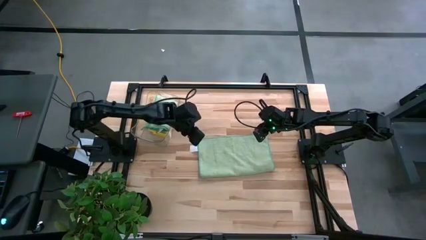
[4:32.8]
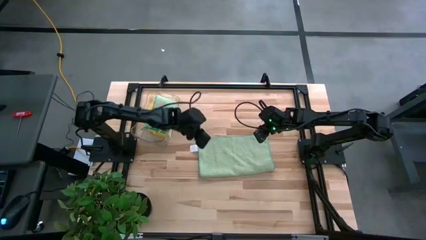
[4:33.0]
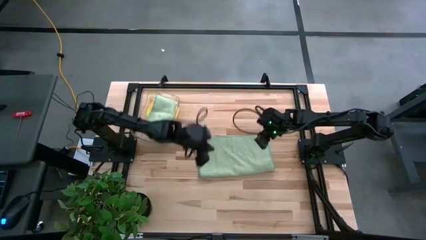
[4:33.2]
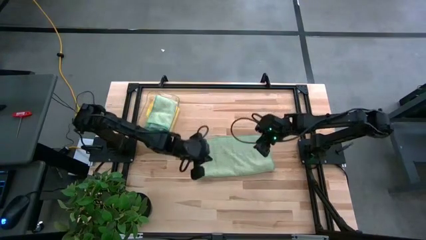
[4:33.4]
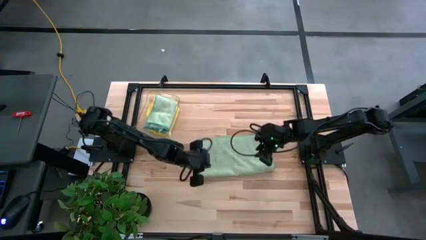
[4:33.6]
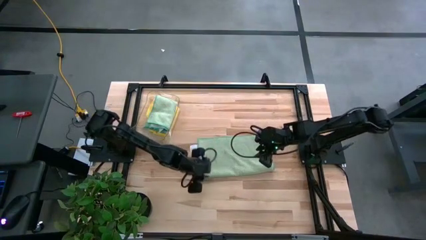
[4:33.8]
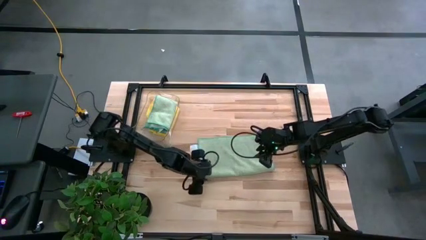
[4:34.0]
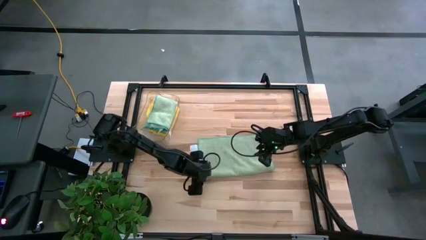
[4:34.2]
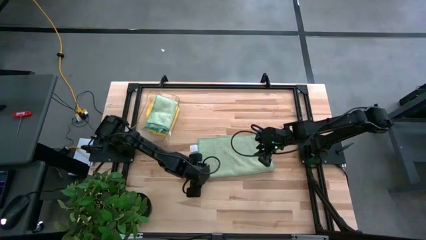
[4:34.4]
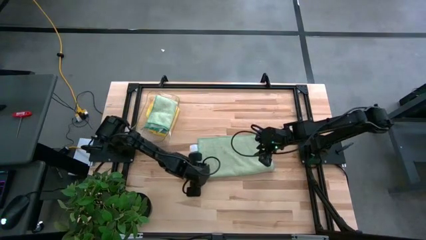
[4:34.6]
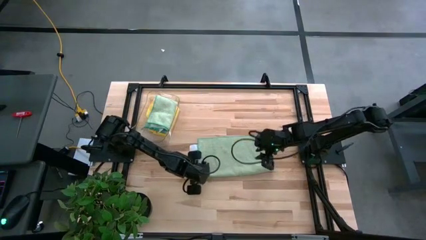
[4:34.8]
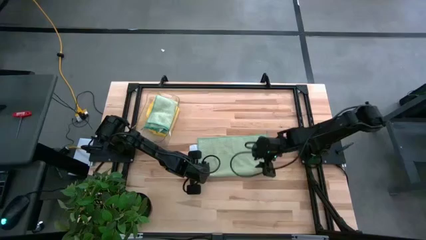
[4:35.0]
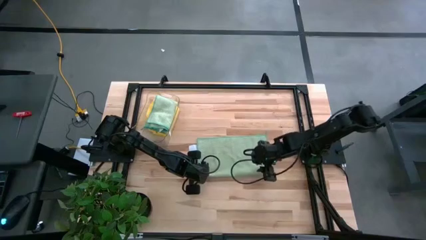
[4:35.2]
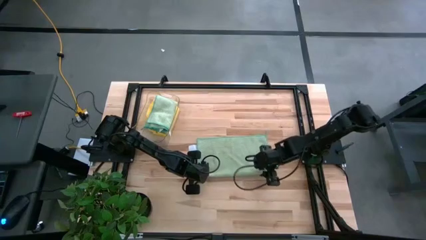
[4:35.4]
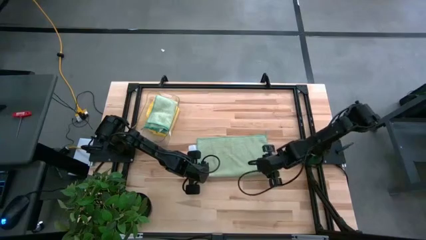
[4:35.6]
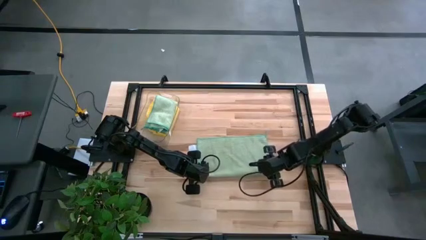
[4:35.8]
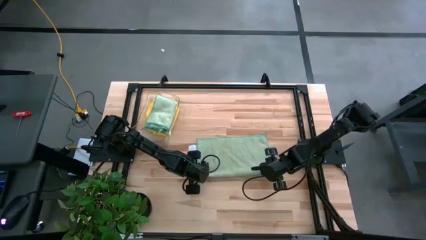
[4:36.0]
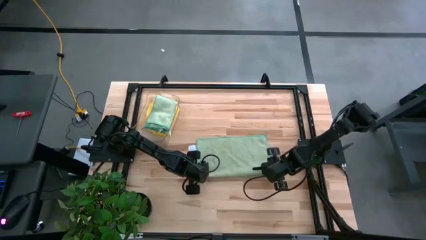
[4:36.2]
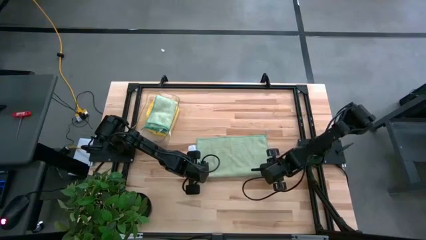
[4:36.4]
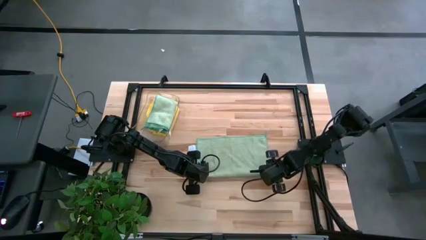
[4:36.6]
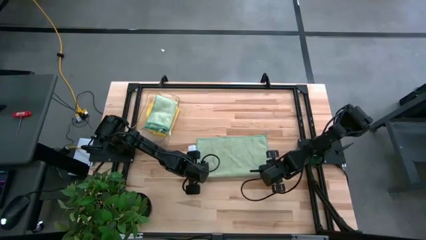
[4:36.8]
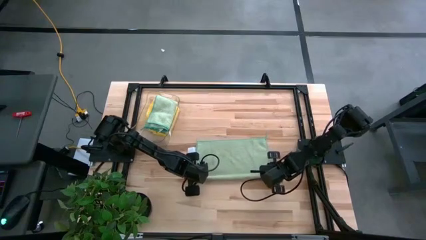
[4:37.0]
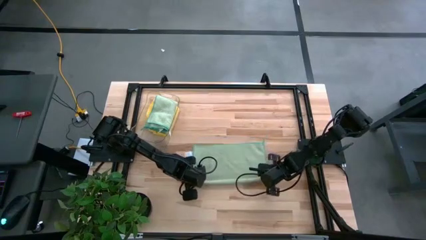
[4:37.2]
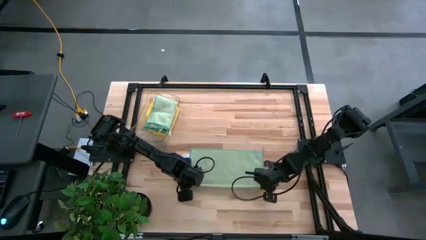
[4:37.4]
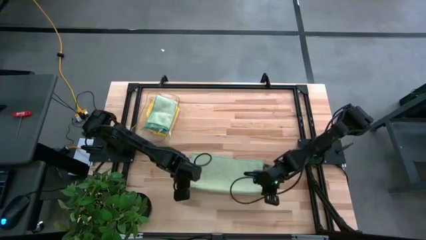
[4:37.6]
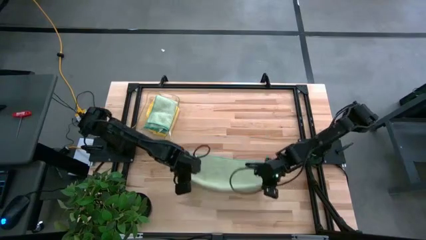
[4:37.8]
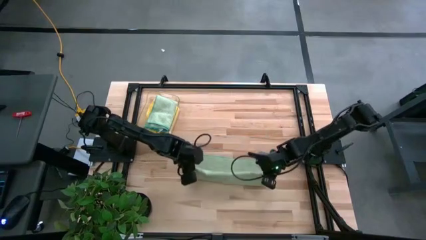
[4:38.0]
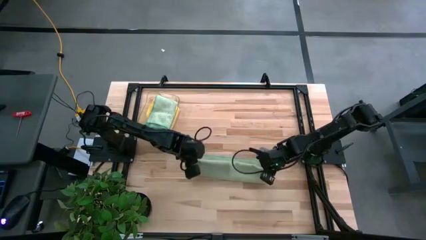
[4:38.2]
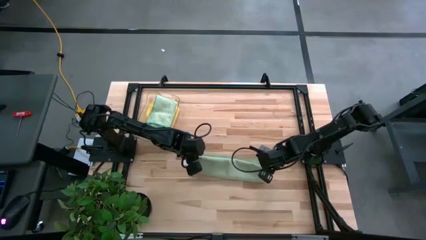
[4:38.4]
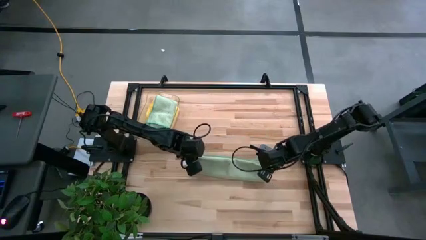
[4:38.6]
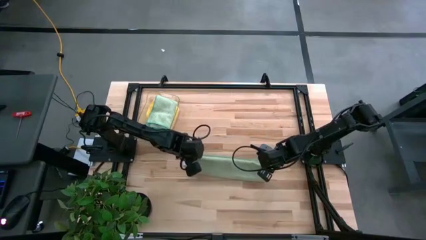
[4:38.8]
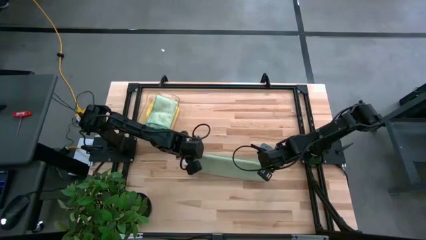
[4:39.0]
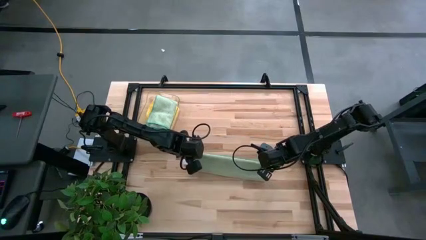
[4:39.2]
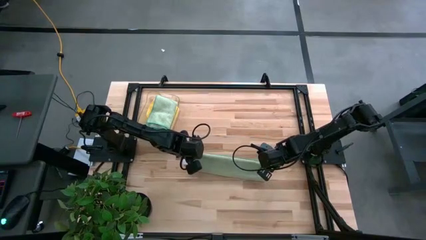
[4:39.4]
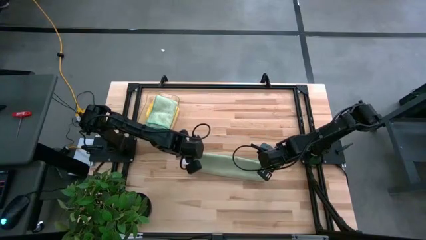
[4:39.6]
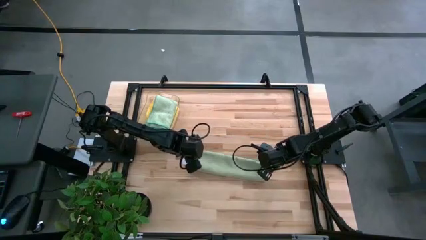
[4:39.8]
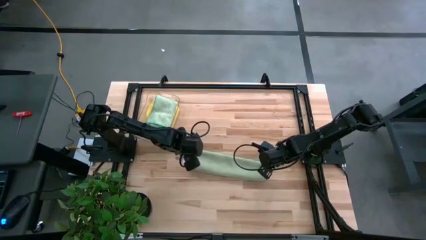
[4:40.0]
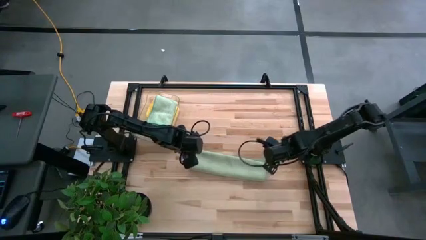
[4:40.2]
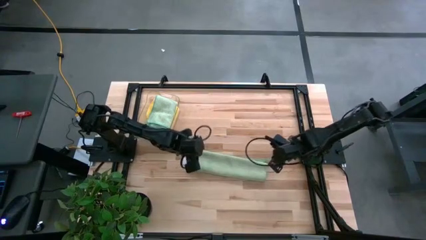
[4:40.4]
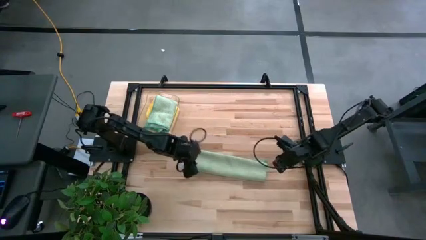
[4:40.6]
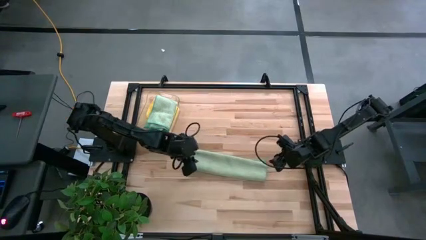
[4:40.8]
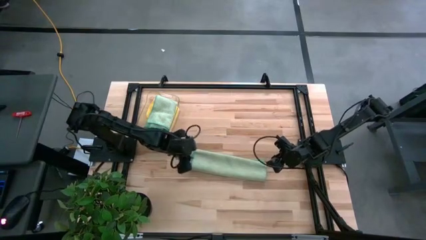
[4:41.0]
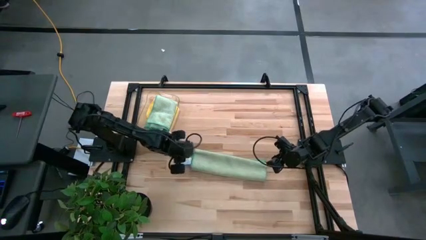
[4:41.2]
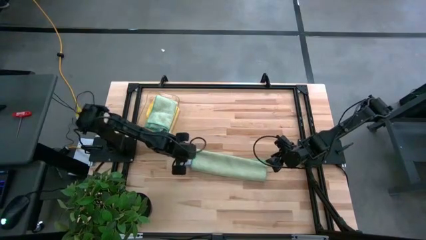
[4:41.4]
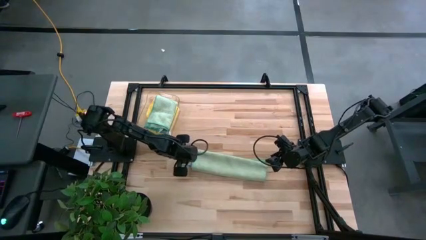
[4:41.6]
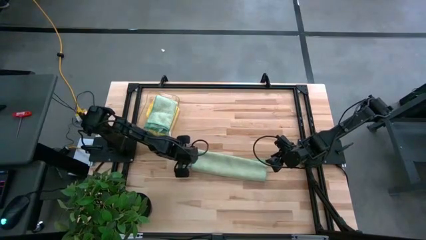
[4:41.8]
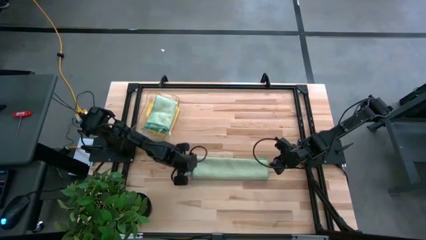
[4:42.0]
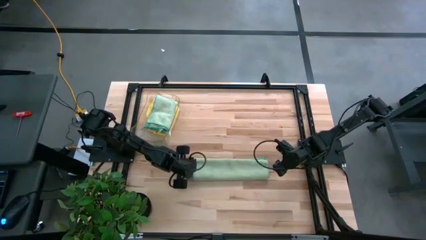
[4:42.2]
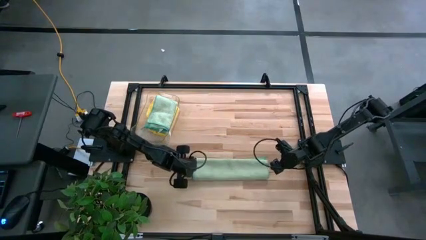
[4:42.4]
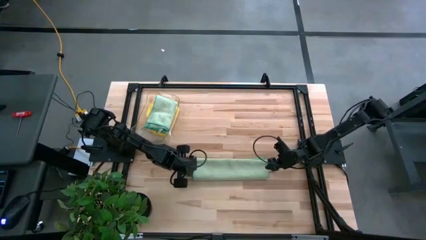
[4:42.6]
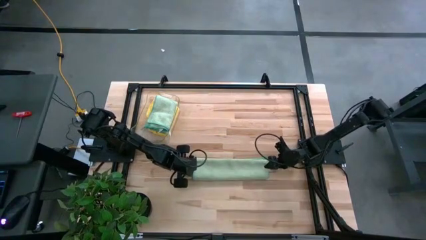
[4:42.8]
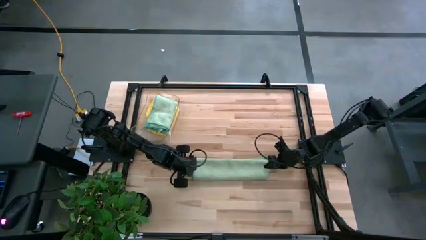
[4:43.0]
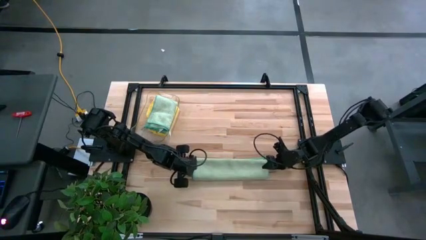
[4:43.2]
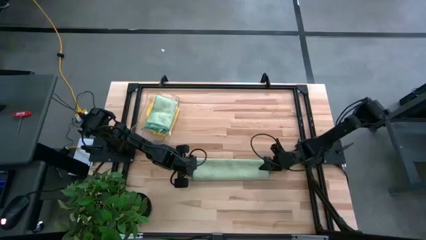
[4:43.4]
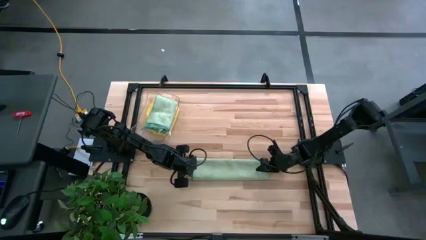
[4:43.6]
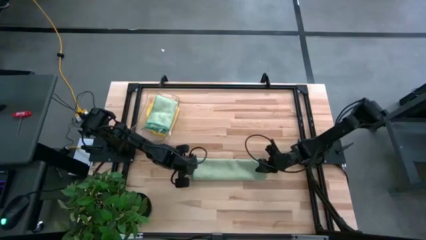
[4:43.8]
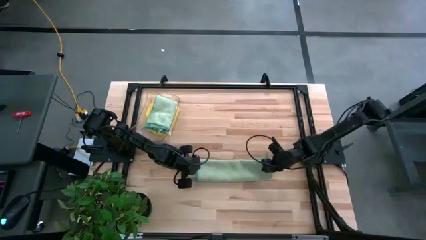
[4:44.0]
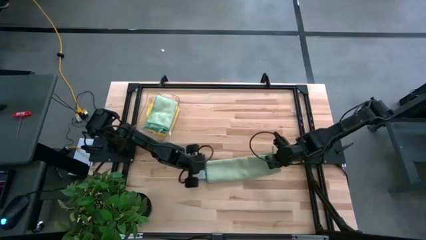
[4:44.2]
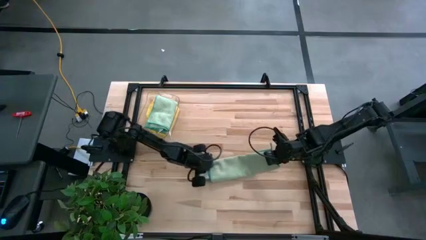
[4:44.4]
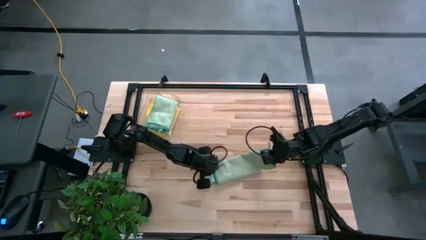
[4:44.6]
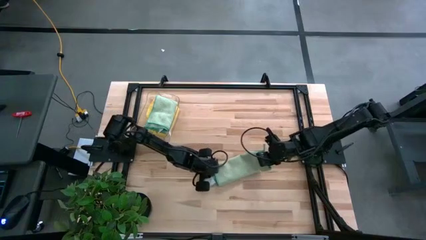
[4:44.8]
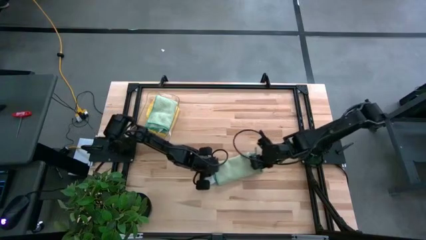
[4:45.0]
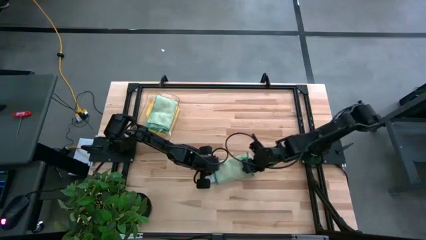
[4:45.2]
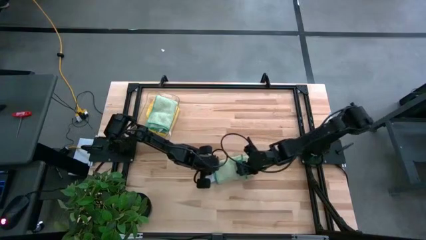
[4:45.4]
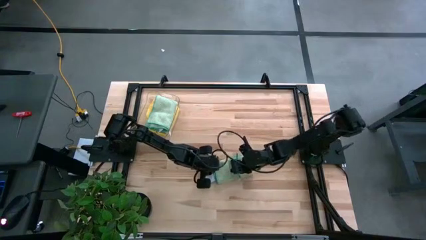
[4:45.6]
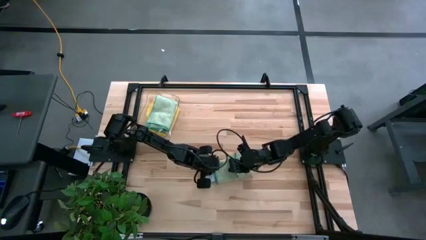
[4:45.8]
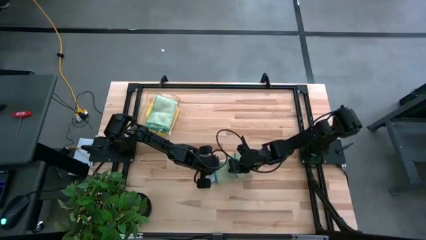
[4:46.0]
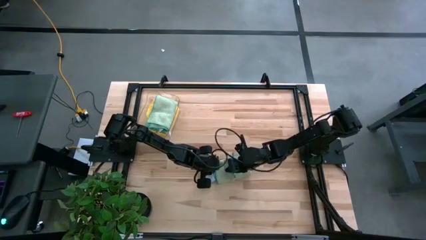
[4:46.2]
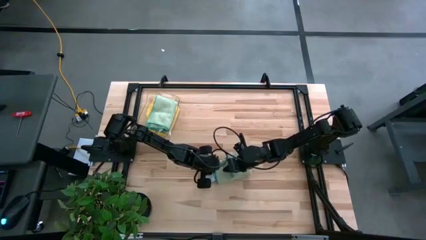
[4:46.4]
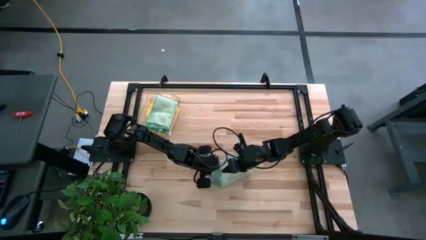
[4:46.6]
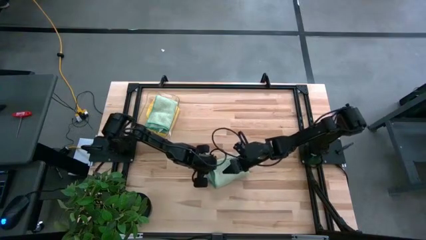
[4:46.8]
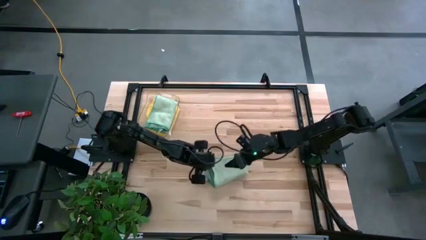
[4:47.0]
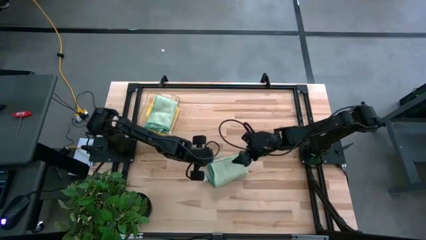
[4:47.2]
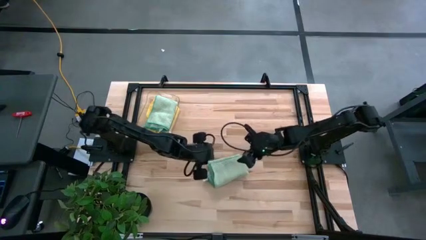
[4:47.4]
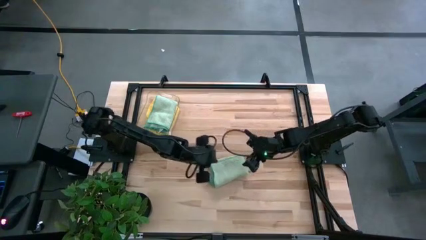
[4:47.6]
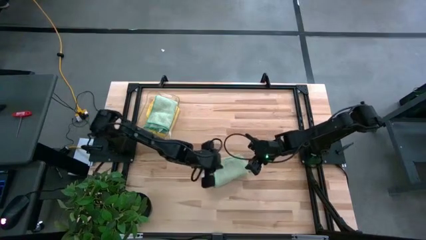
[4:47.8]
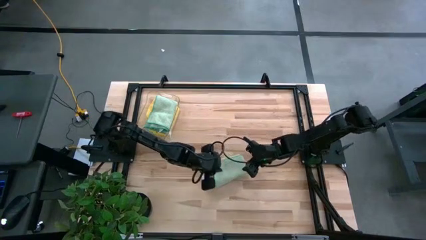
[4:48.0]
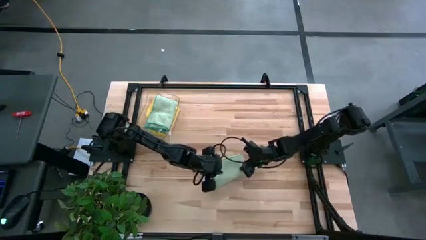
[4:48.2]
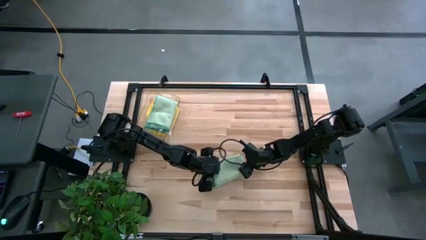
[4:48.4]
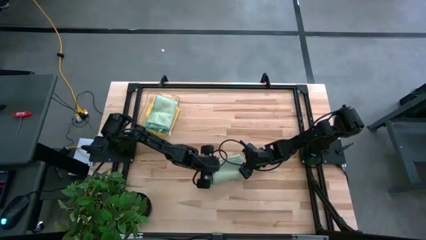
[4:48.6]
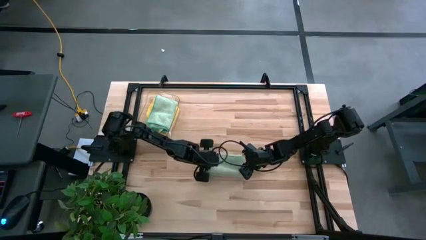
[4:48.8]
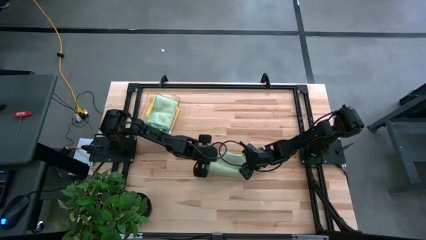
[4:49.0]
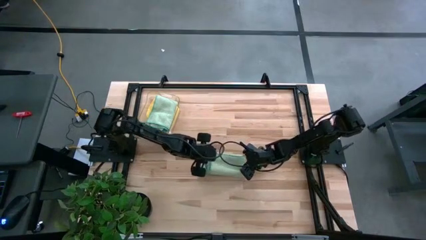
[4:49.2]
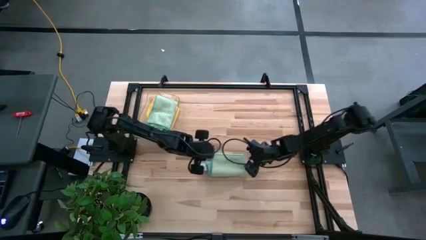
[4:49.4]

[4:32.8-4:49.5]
Task: Fold microfiber towels
Fold the green towel
